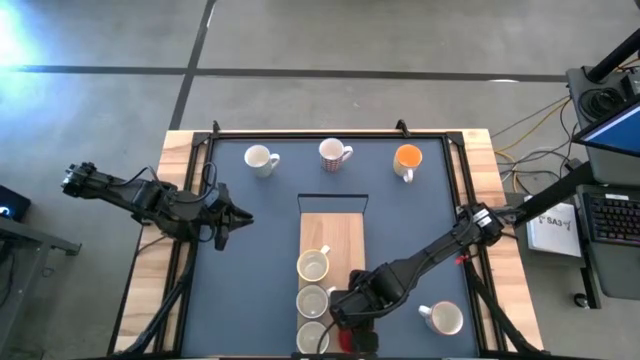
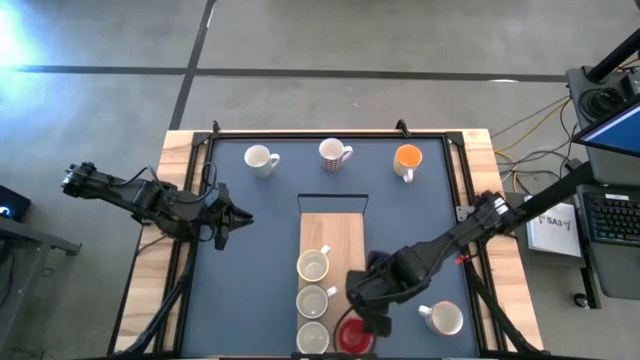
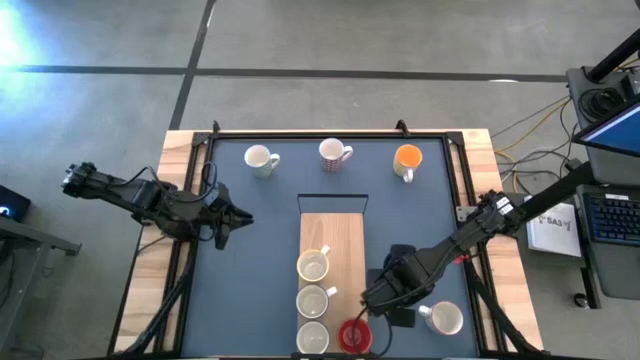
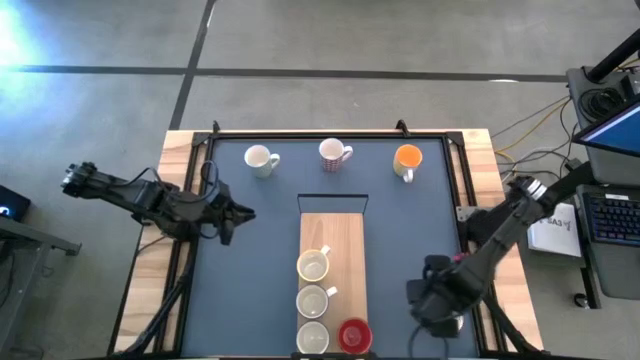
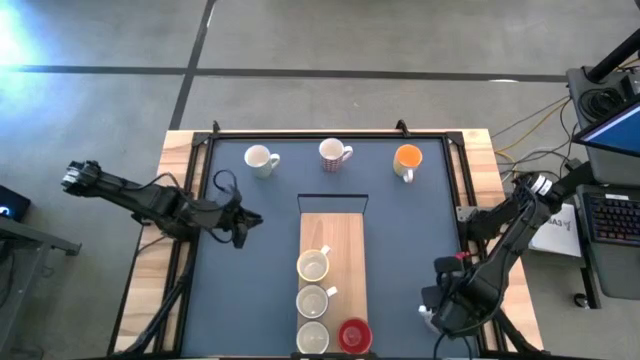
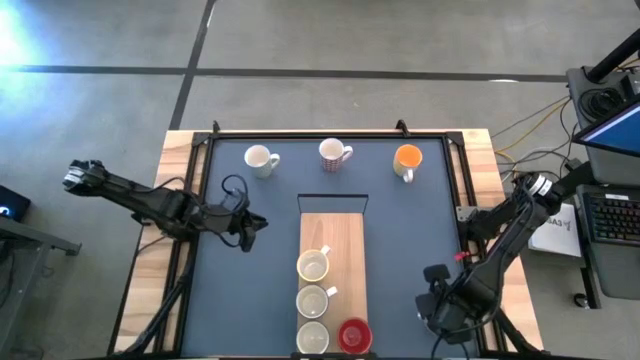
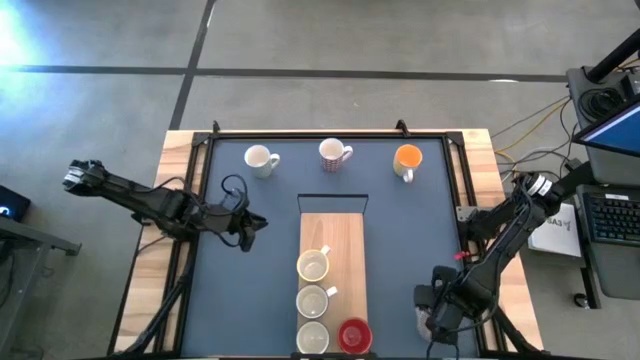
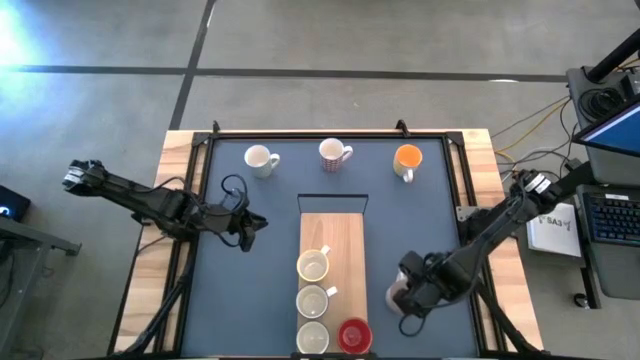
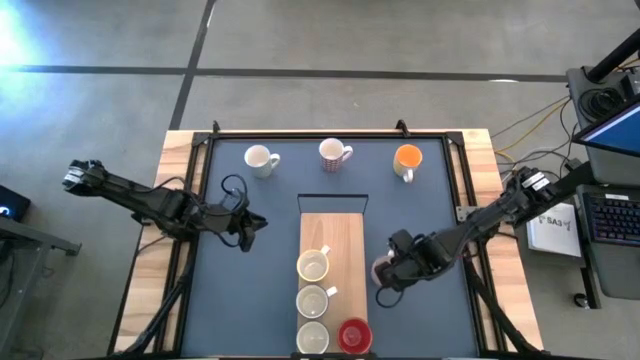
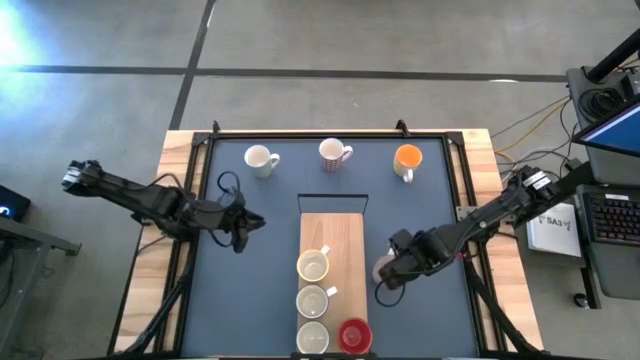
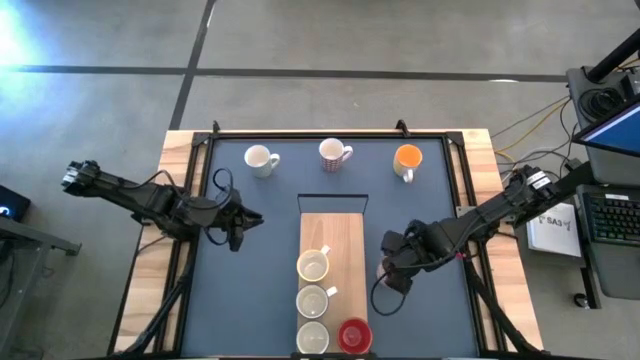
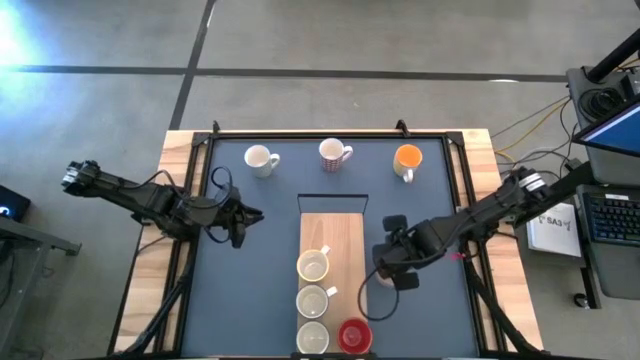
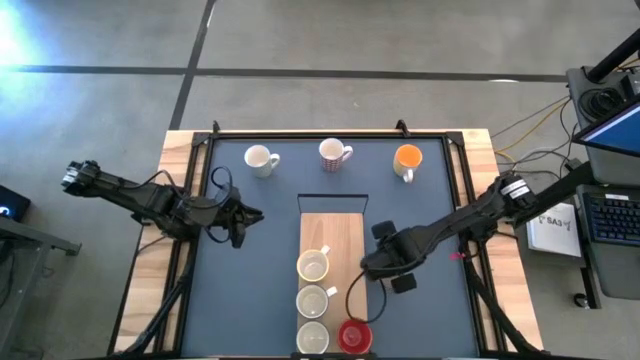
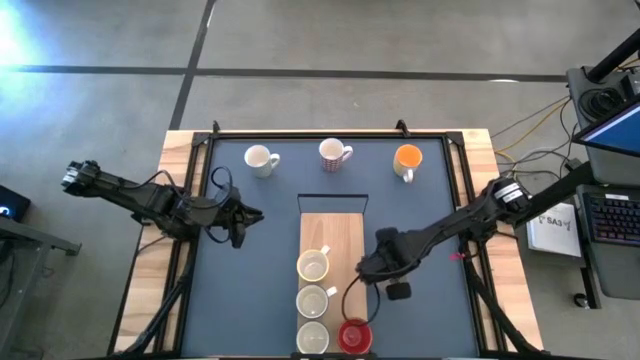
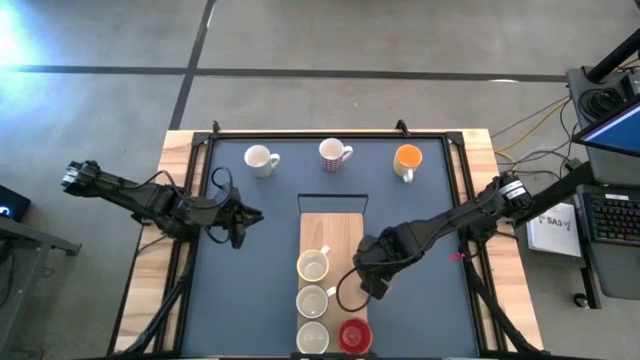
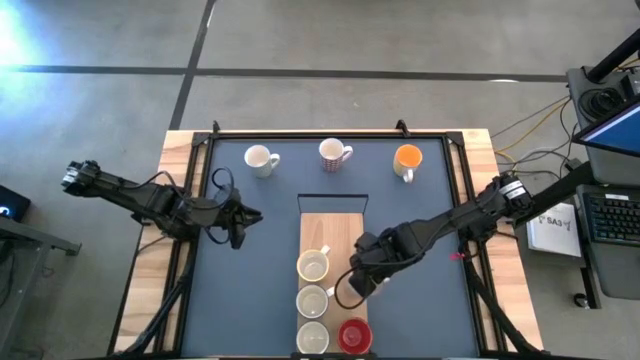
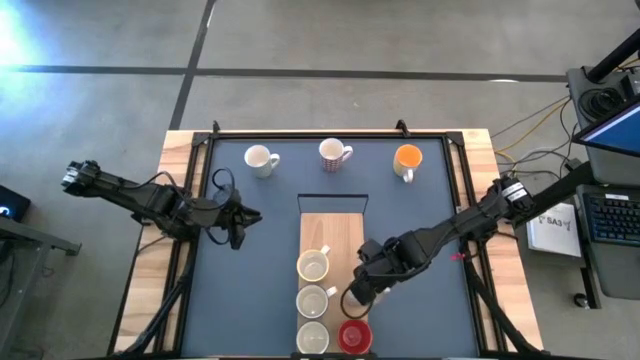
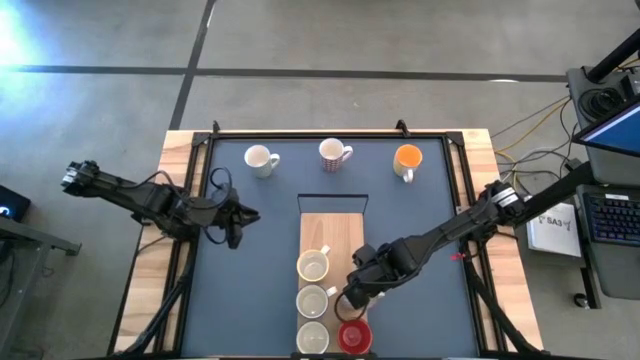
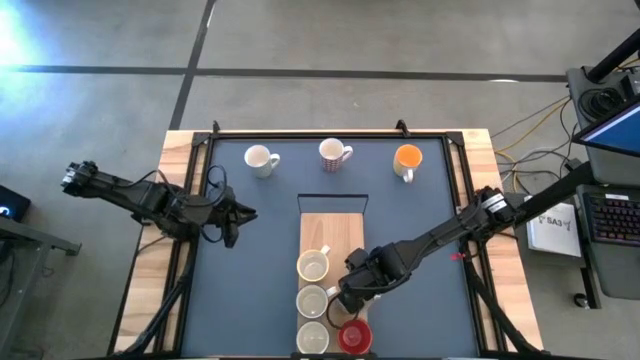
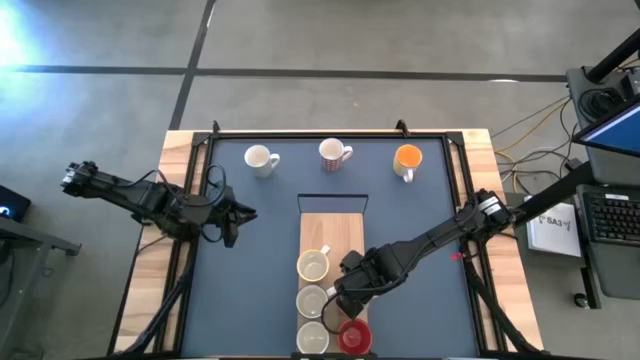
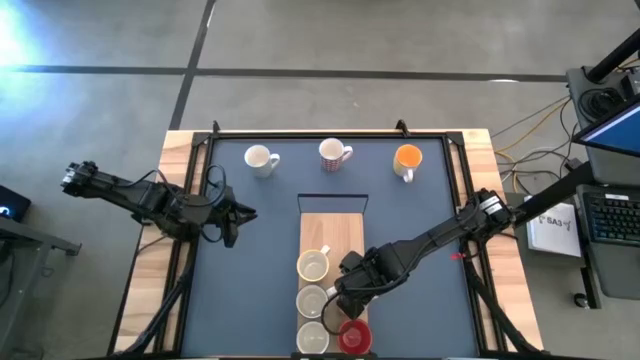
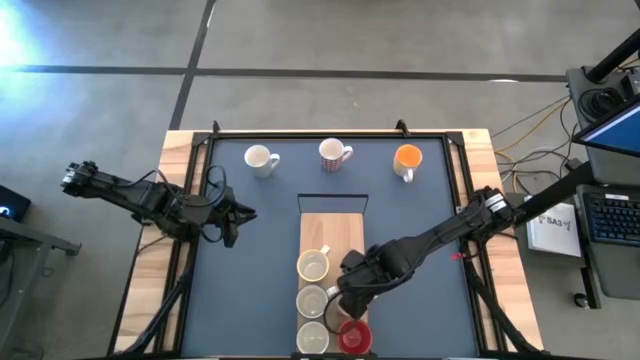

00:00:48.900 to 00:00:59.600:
Task: Place coffee mugs
Put the red and gray mug on the shelf

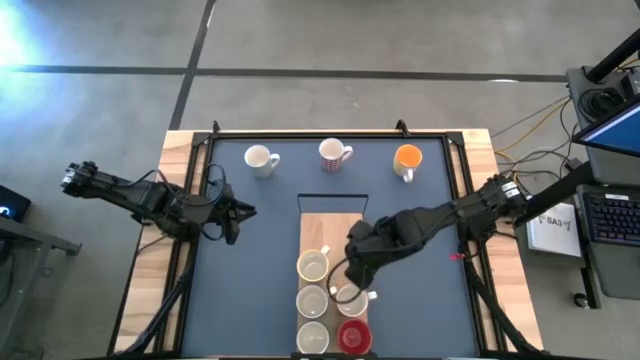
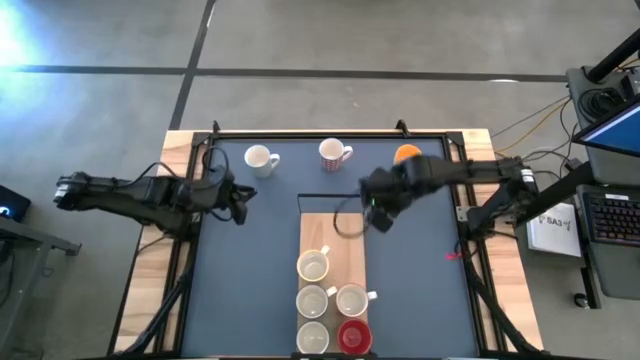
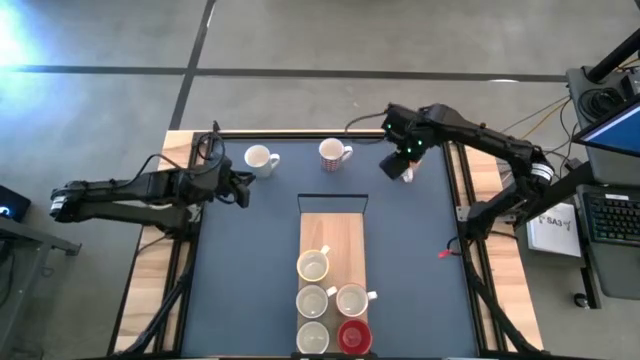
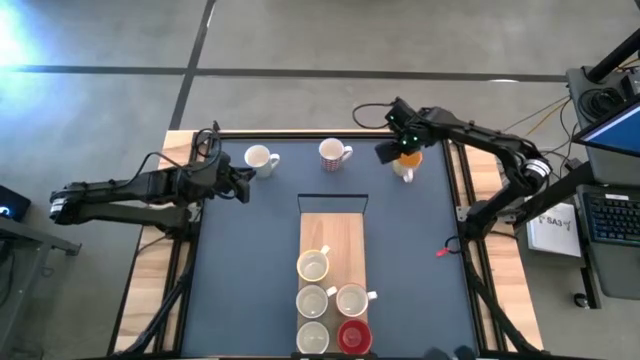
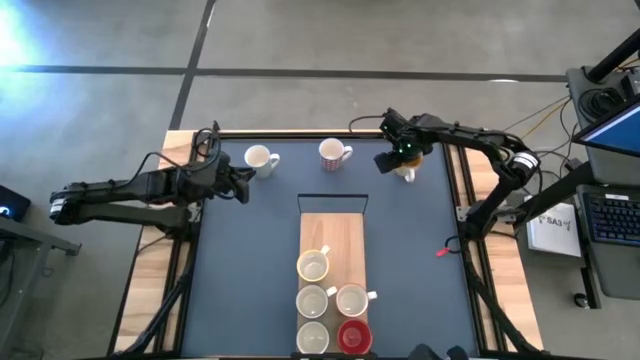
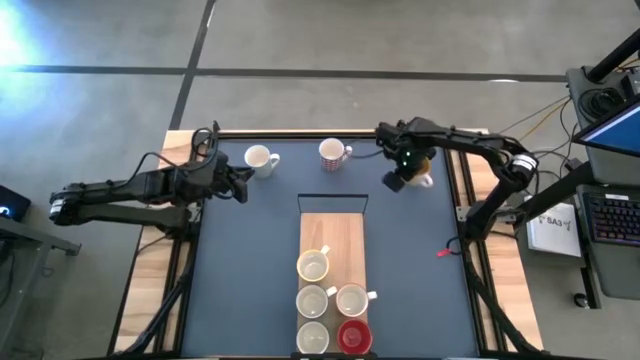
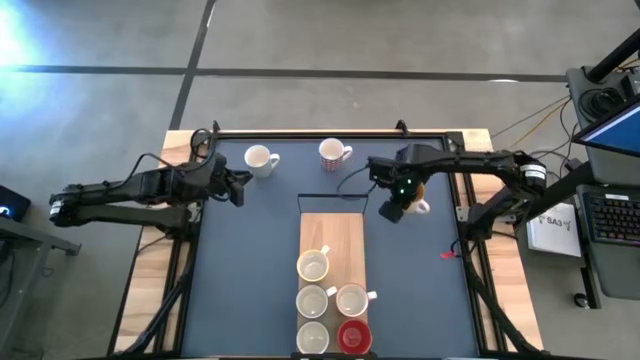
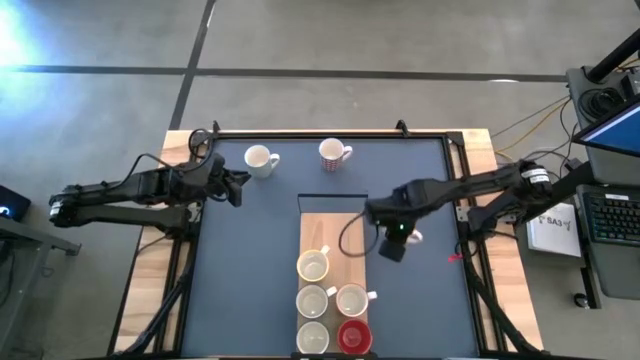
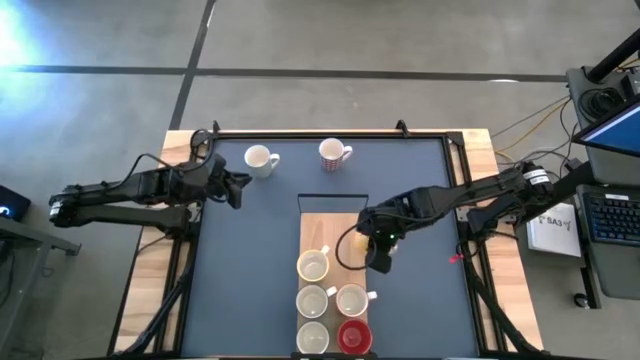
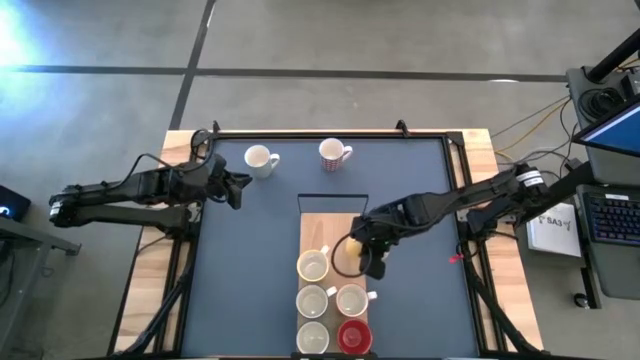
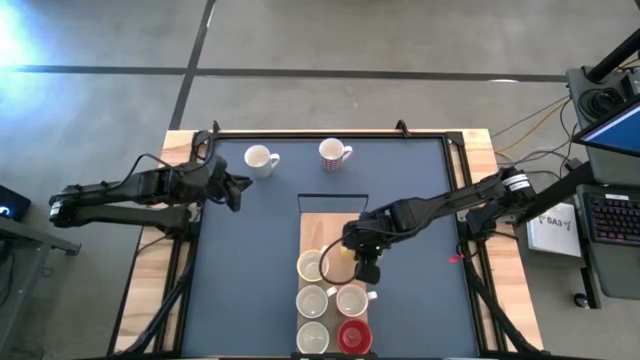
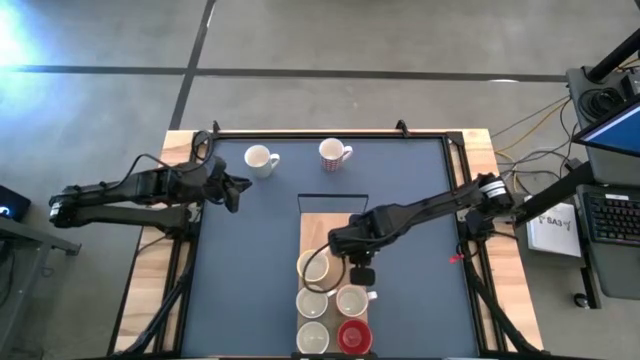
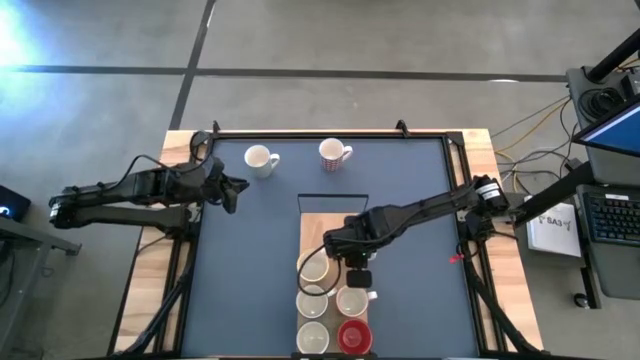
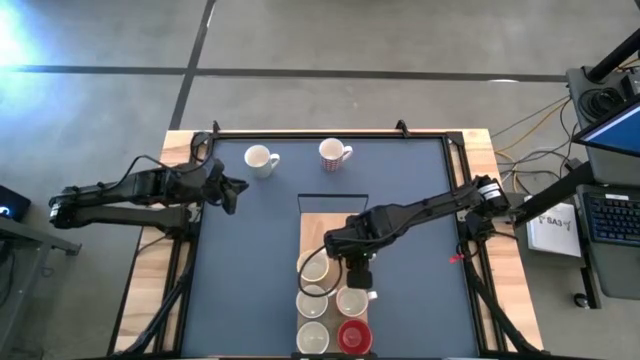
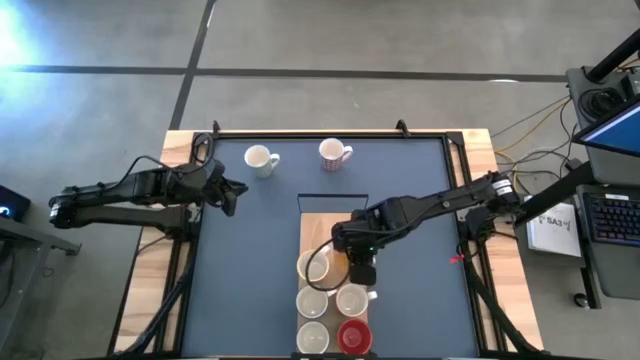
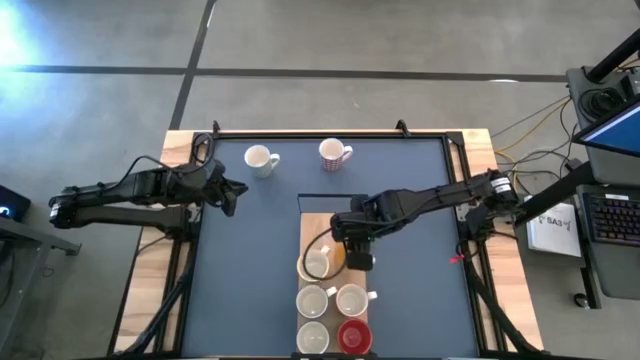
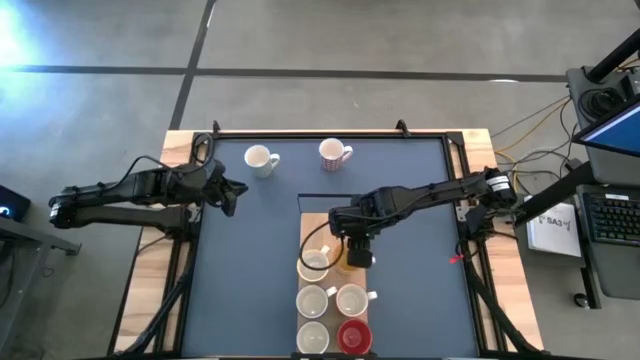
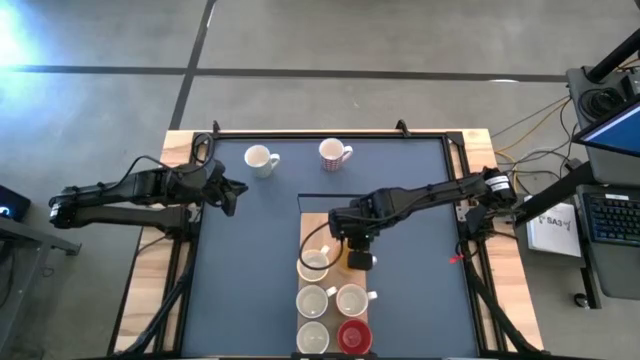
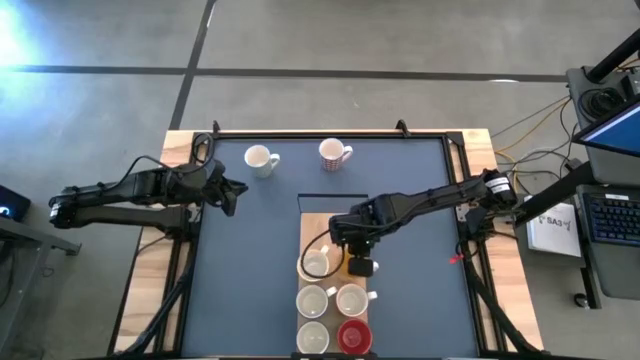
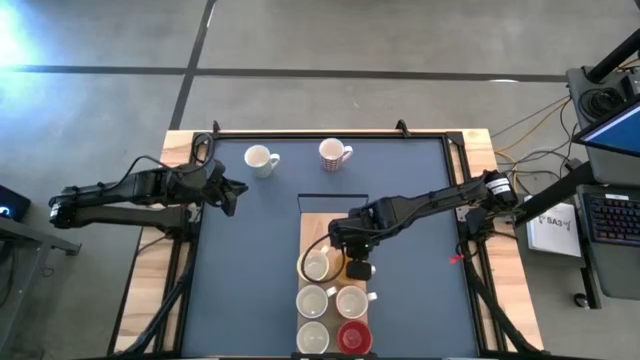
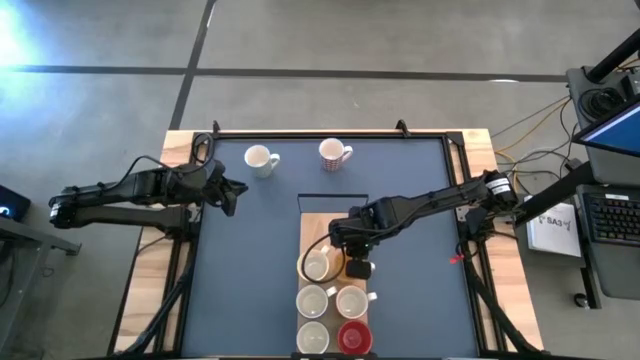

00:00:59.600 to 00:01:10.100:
Put the yellow mug on the shelf
